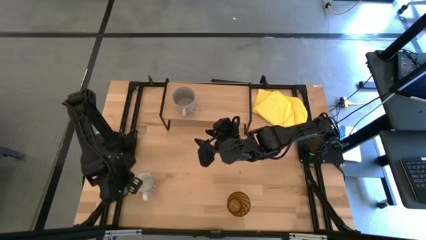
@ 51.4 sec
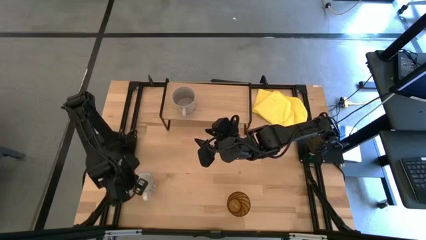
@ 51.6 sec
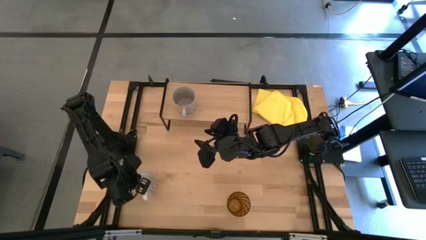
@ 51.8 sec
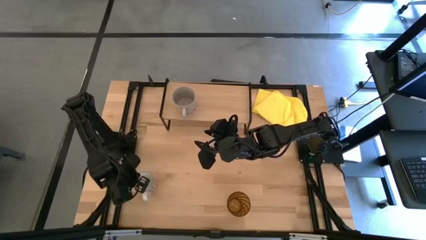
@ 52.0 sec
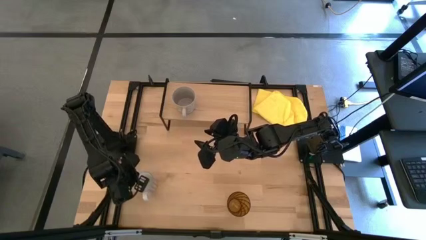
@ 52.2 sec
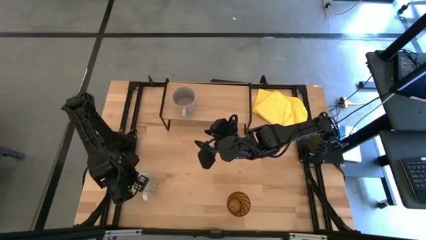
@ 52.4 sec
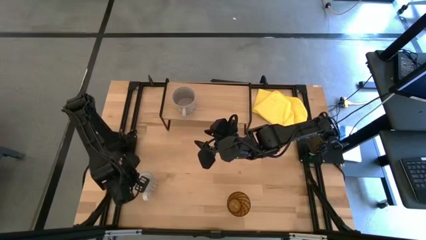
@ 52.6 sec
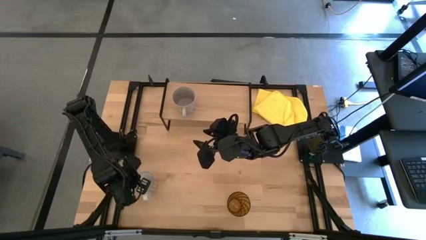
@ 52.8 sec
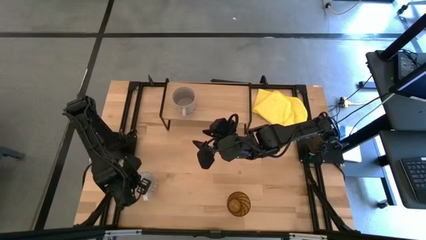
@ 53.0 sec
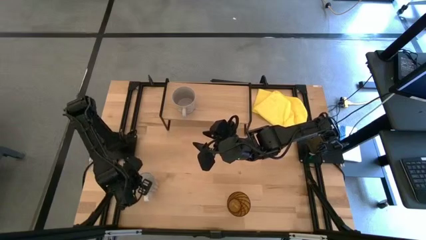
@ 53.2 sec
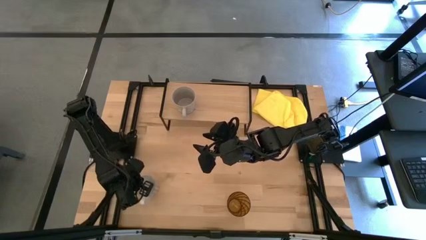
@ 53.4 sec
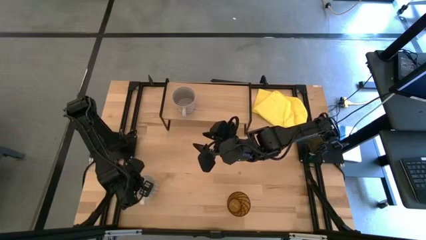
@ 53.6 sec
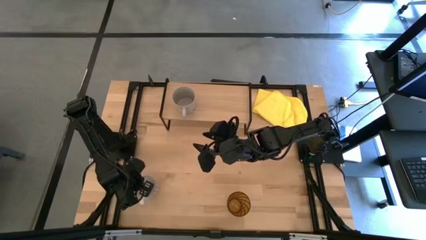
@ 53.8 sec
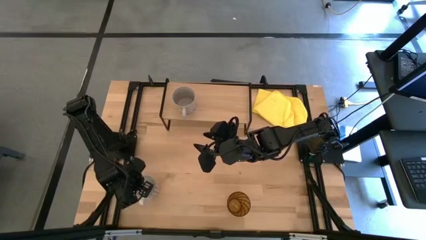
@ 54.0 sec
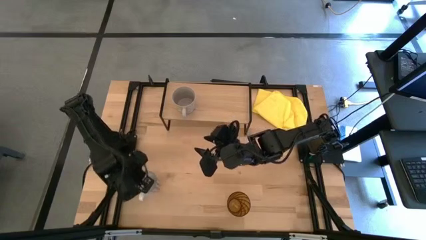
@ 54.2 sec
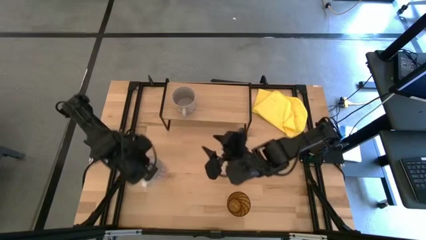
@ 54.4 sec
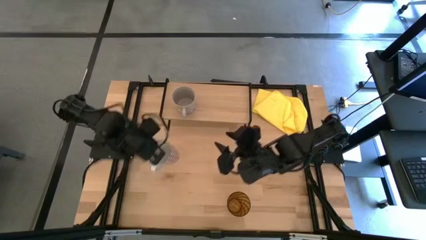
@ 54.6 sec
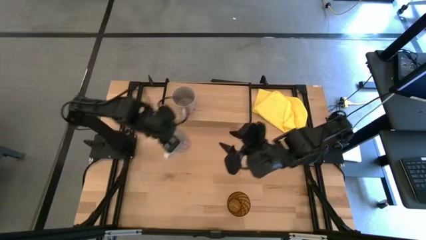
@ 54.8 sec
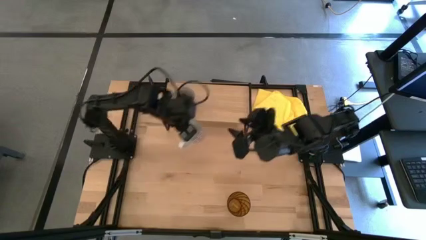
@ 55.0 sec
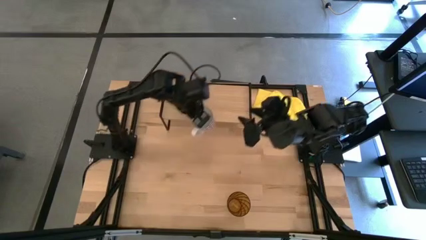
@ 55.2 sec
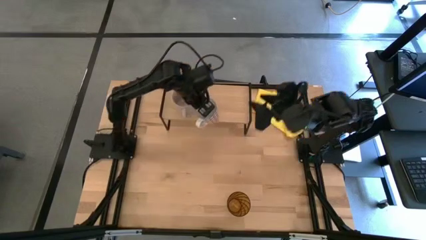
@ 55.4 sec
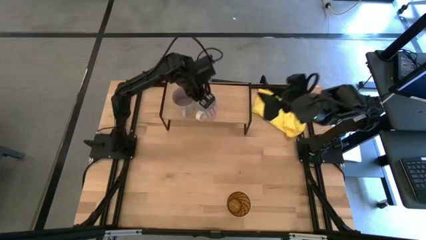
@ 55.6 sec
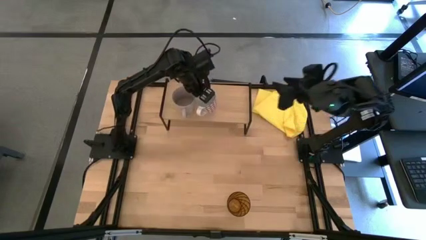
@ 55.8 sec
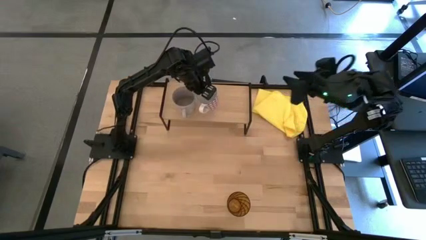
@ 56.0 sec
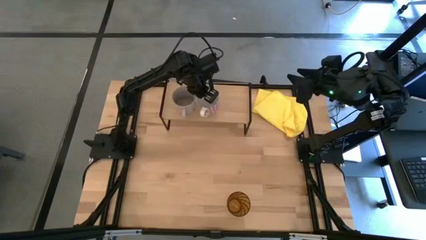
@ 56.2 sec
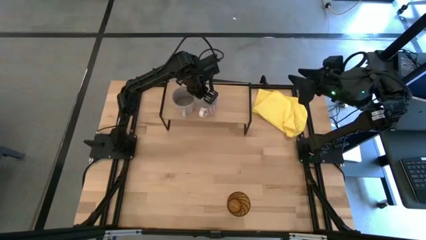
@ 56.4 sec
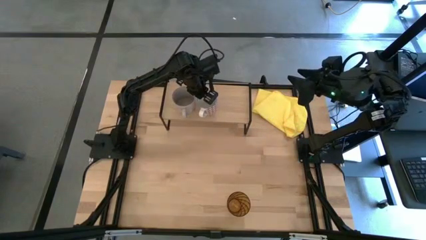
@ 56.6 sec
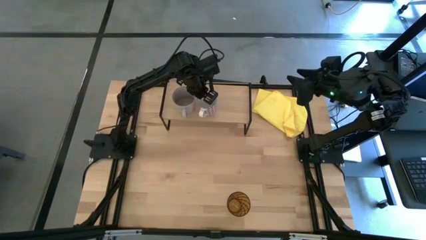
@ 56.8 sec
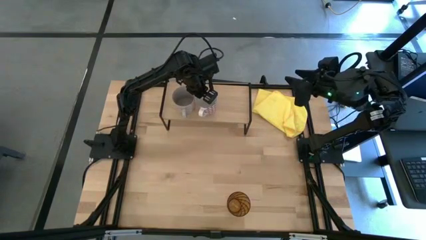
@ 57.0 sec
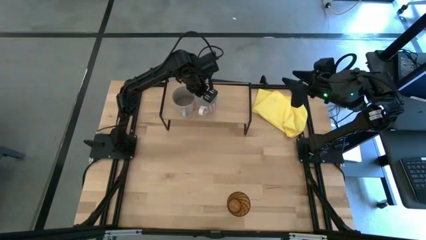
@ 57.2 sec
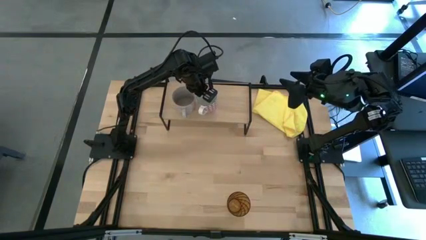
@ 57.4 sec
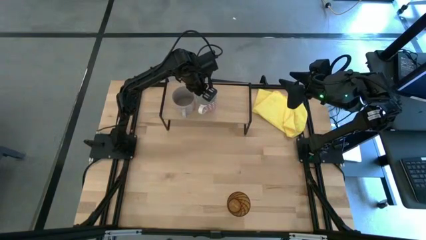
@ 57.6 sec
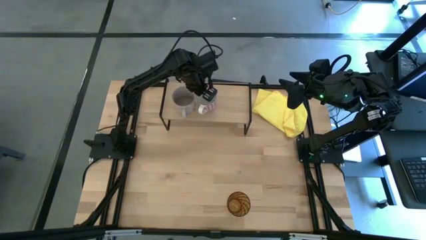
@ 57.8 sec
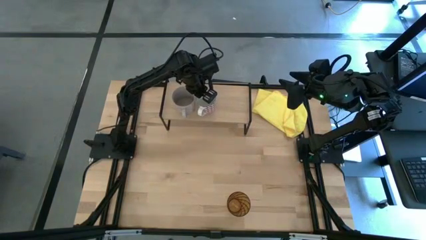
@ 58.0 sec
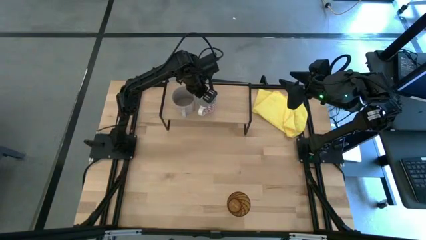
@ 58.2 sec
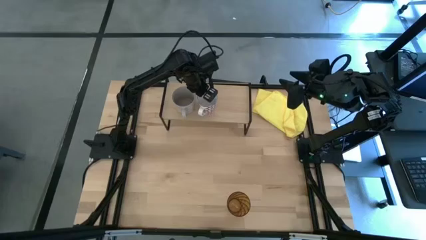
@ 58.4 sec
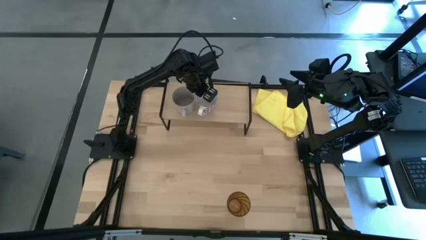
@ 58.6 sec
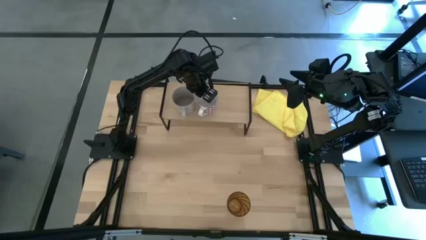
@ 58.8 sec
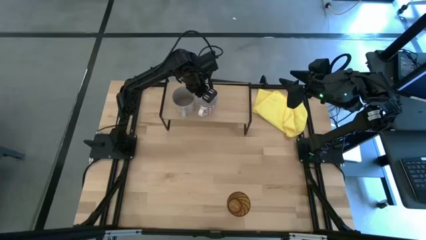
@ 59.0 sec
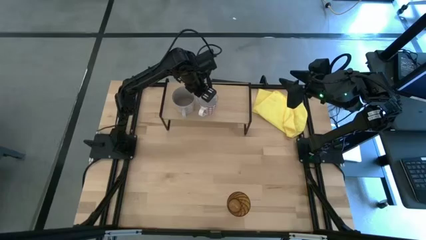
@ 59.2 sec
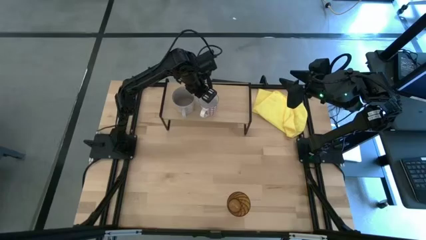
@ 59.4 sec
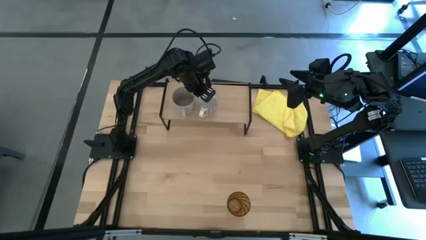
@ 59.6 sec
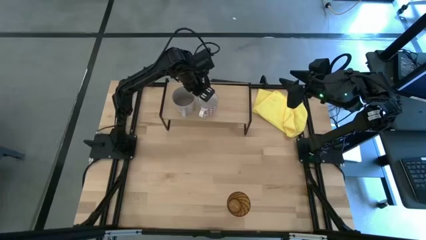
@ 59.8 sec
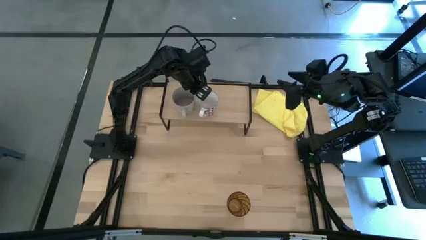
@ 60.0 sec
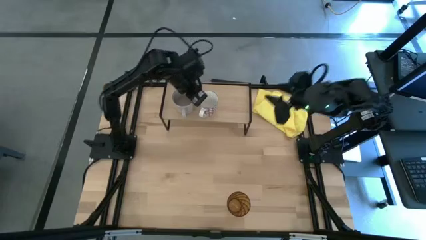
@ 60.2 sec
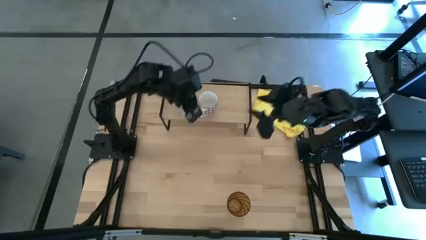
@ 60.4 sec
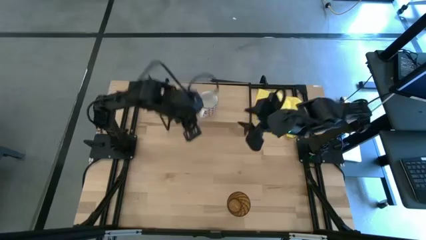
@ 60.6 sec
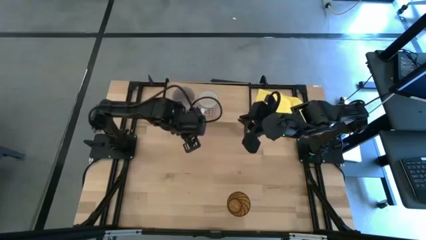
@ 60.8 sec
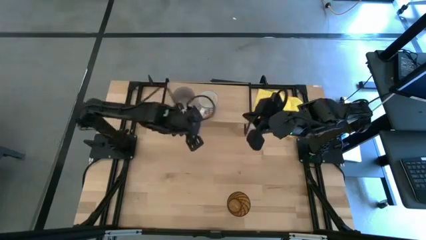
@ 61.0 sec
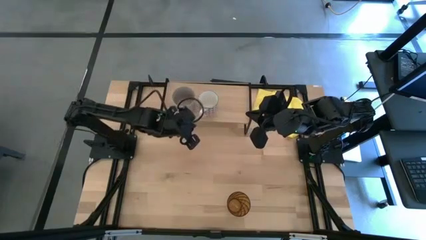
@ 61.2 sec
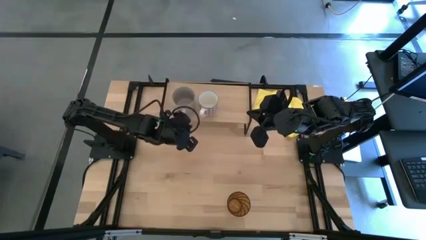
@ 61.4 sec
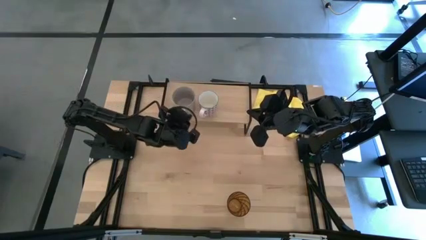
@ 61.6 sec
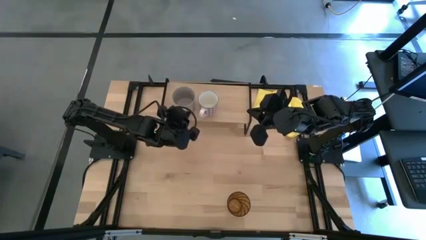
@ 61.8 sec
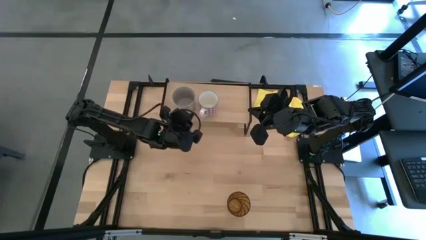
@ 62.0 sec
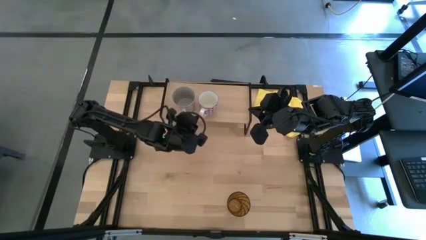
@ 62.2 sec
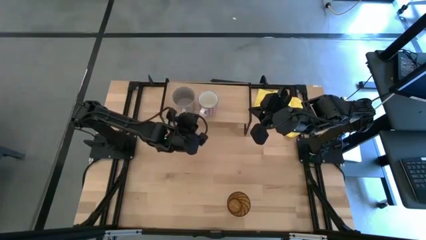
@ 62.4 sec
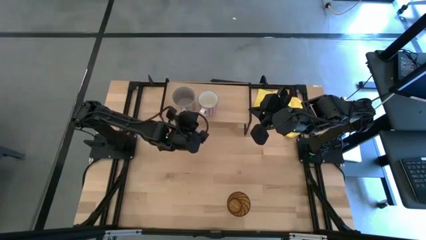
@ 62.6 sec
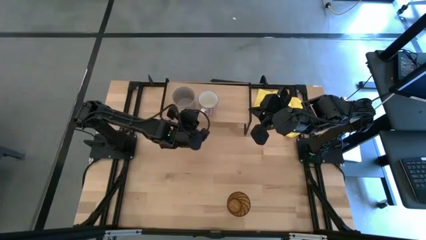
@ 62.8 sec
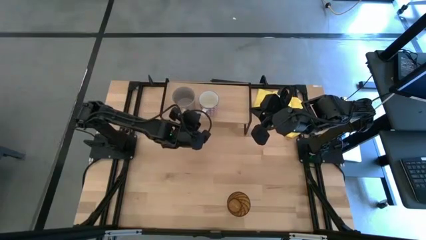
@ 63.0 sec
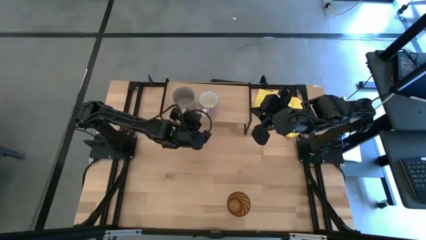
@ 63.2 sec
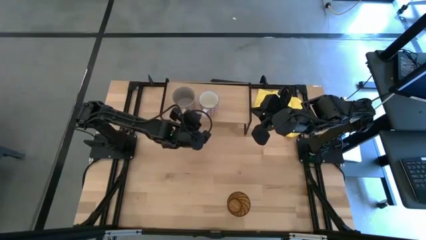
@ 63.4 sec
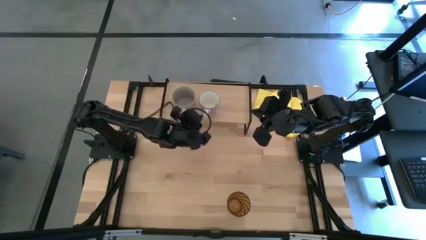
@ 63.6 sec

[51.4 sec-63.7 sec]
Task: Stack small to large cups/mugs on shelf
Put the red and white mug on the shelf

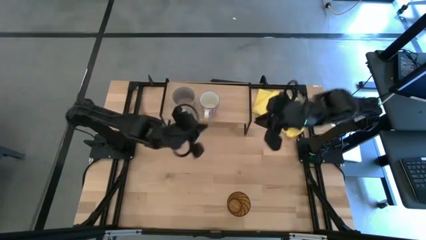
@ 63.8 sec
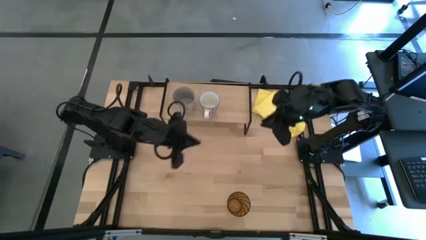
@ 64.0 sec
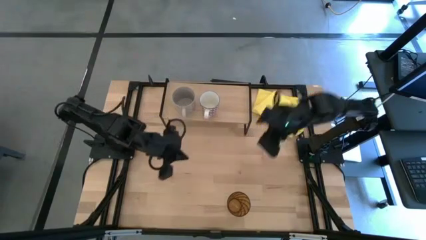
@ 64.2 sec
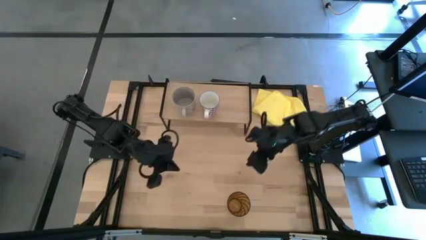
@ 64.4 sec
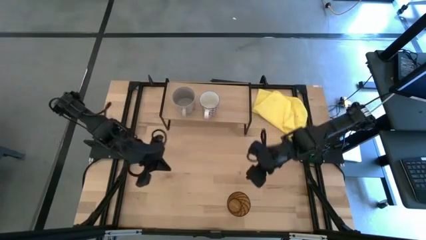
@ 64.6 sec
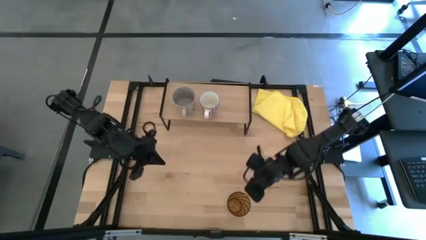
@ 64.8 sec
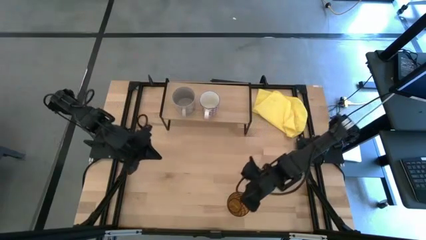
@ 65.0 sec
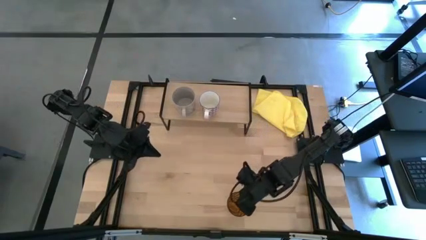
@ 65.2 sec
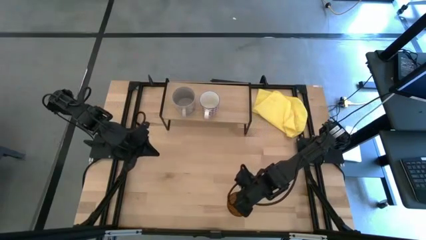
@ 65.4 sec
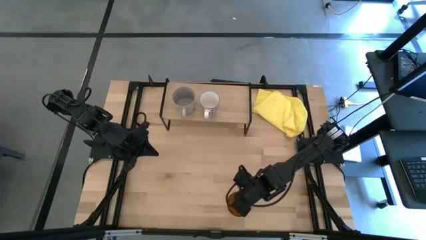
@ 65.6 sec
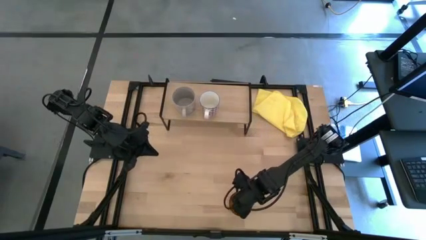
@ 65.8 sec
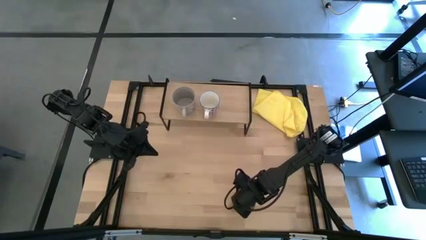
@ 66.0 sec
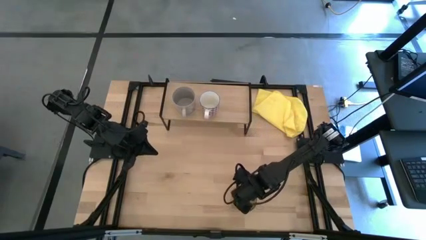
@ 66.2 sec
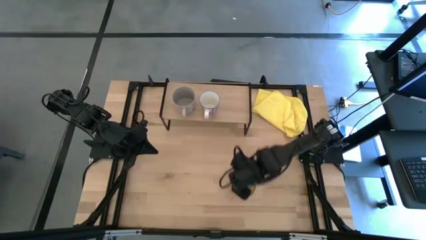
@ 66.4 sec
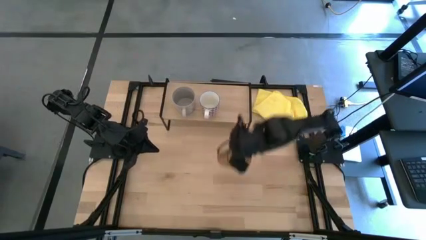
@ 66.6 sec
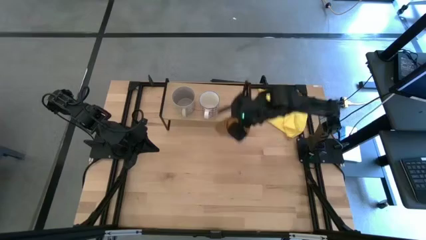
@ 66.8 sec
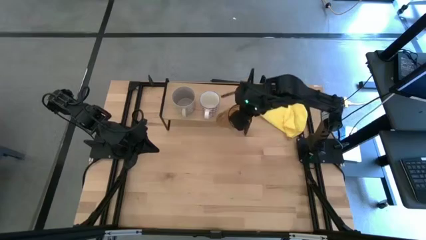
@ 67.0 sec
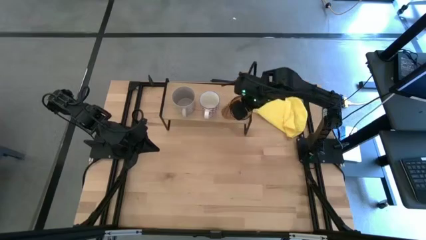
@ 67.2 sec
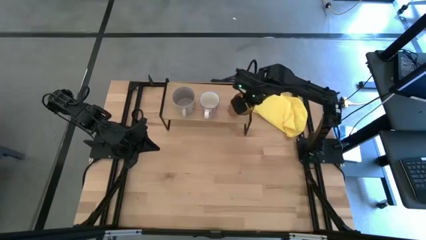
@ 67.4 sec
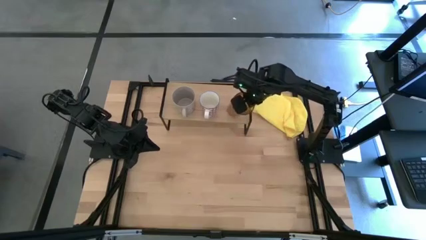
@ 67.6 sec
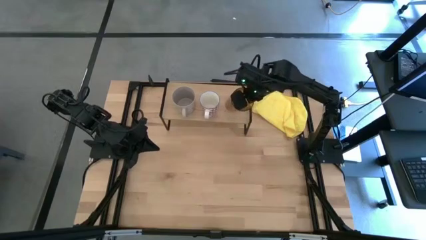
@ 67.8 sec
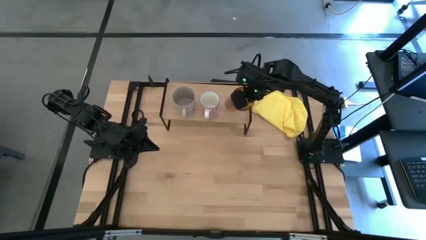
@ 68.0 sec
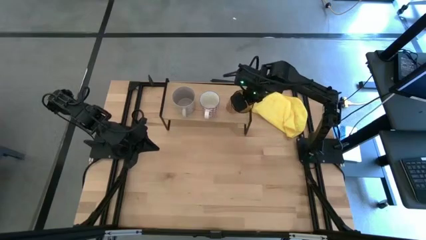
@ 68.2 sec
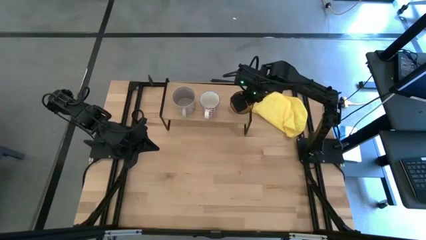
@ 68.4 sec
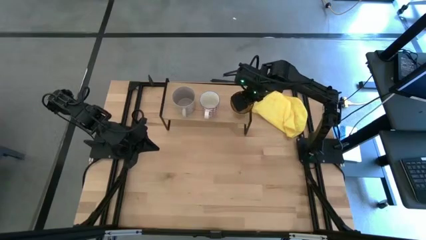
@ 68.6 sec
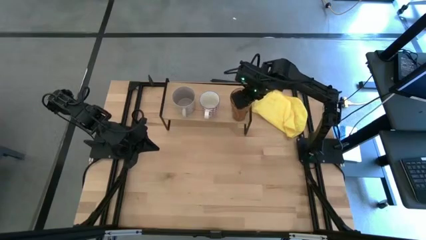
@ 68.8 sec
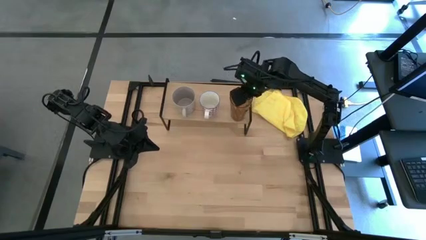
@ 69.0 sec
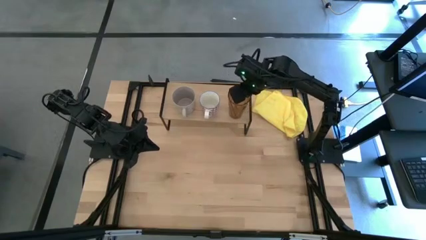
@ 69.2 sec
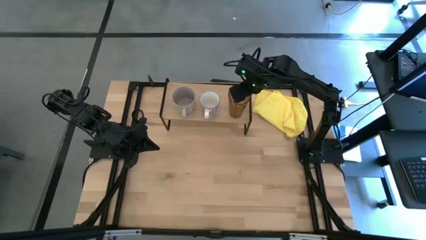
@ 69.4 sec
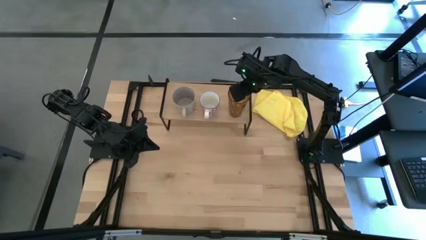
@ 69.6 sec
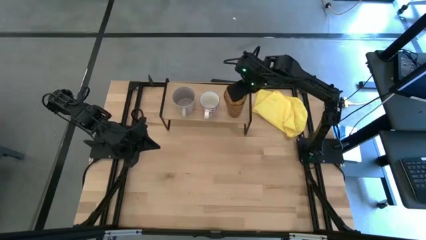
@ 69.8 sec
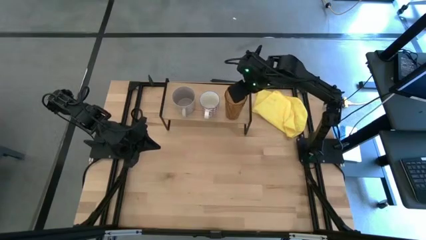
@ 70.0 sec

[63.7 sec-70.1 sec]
Put the brown cup on the shelf
